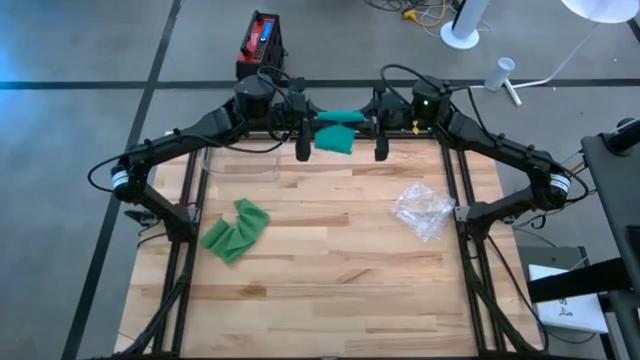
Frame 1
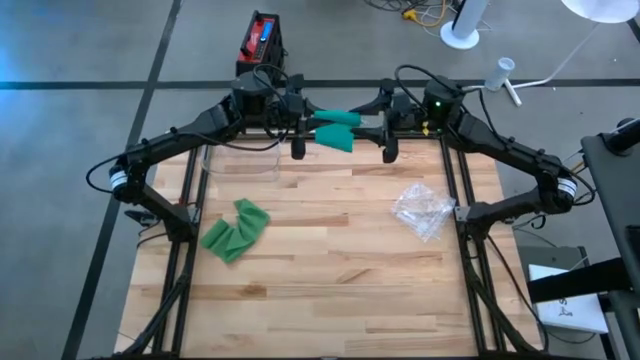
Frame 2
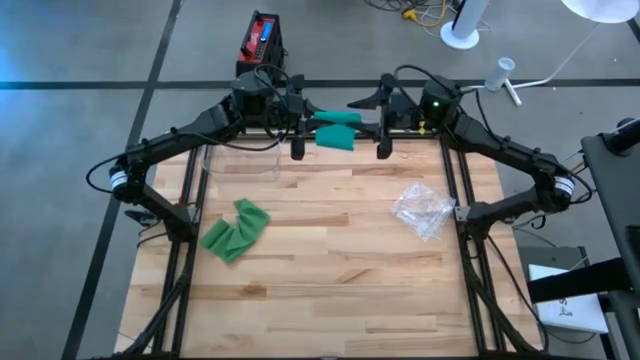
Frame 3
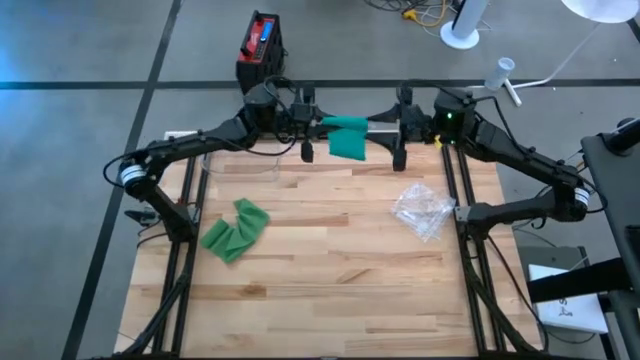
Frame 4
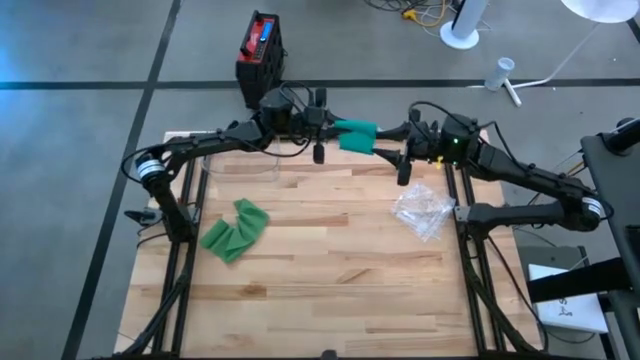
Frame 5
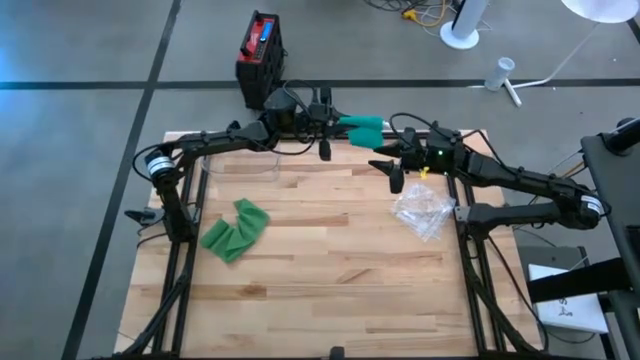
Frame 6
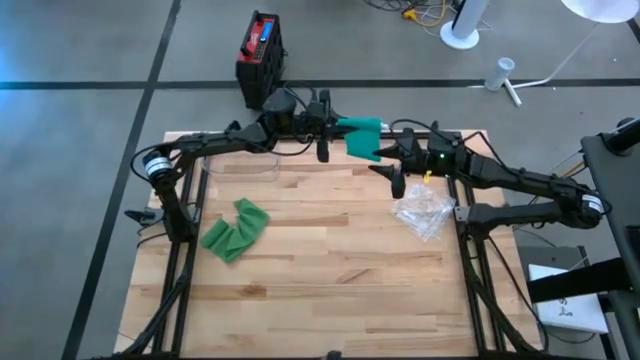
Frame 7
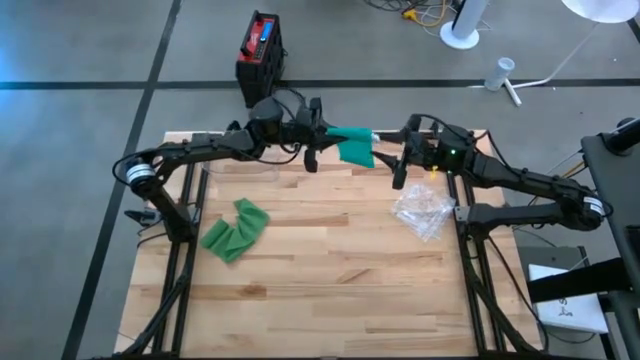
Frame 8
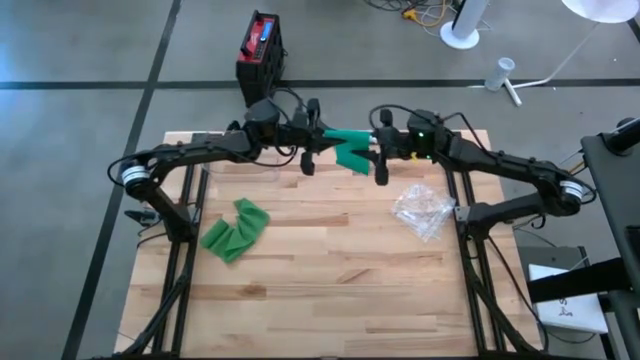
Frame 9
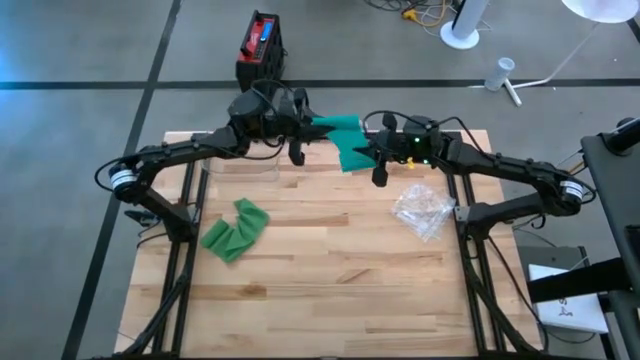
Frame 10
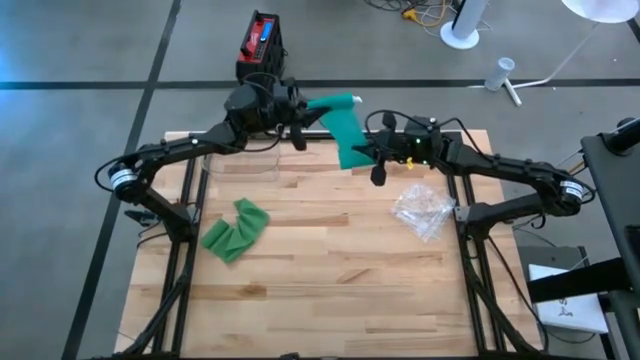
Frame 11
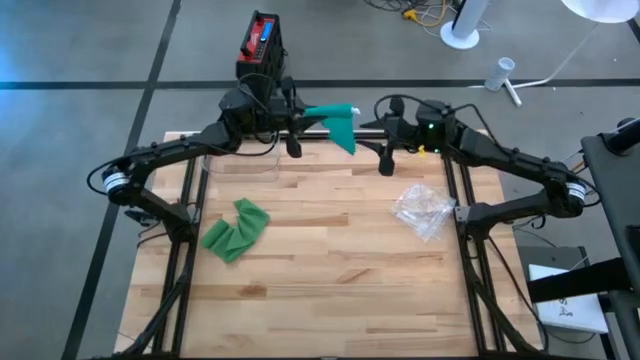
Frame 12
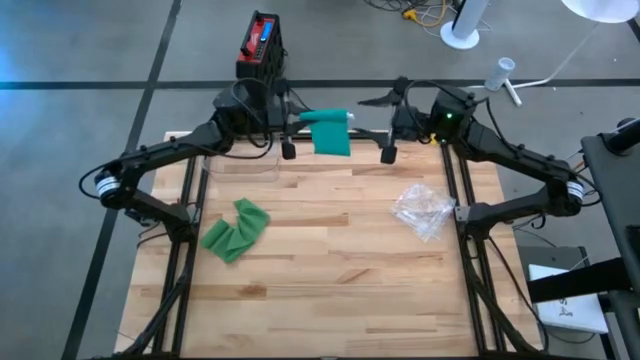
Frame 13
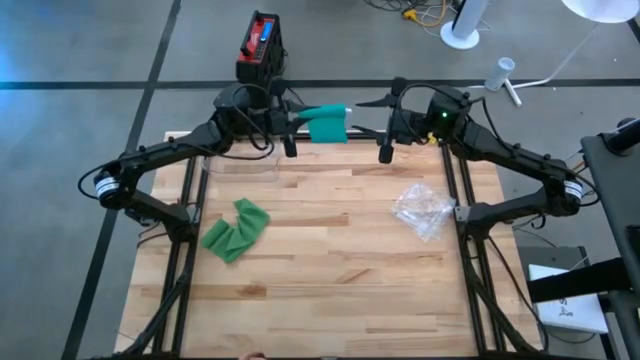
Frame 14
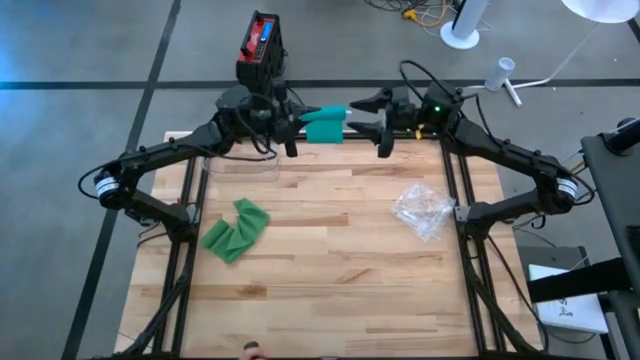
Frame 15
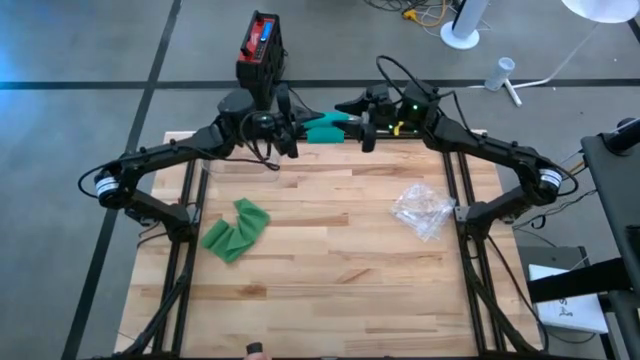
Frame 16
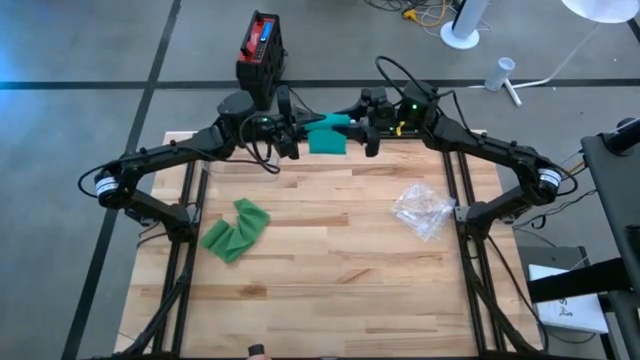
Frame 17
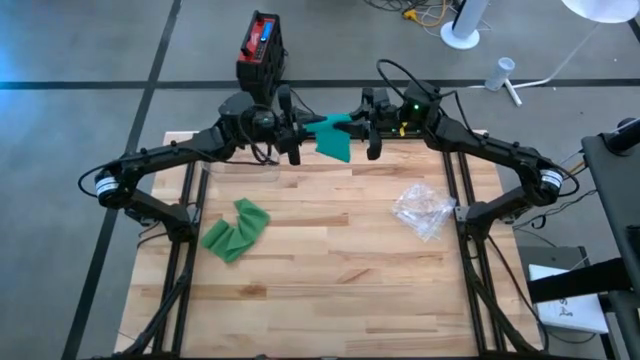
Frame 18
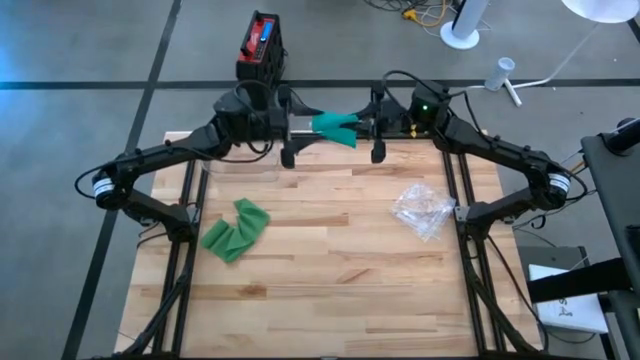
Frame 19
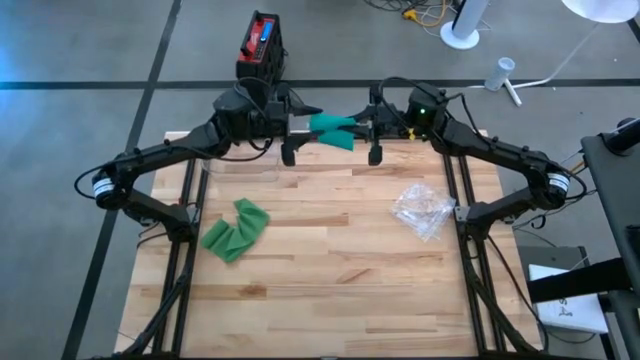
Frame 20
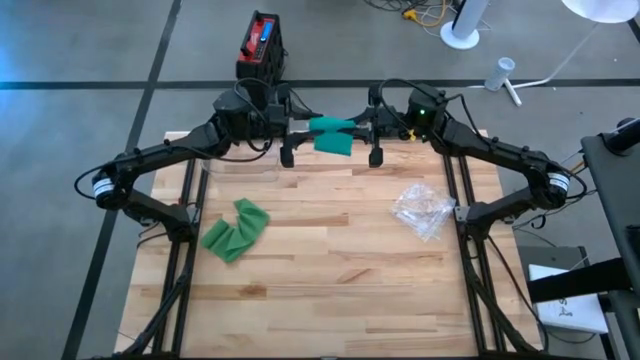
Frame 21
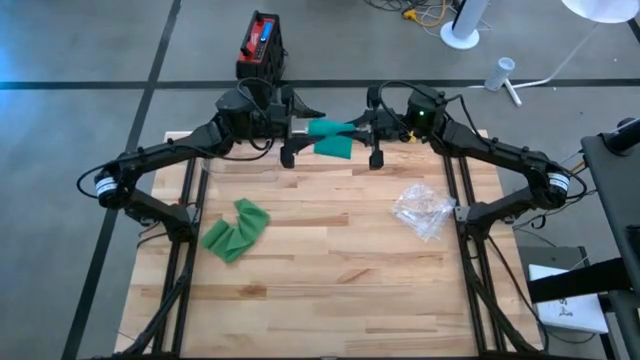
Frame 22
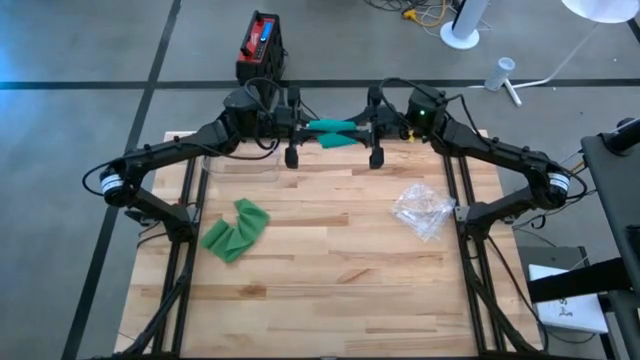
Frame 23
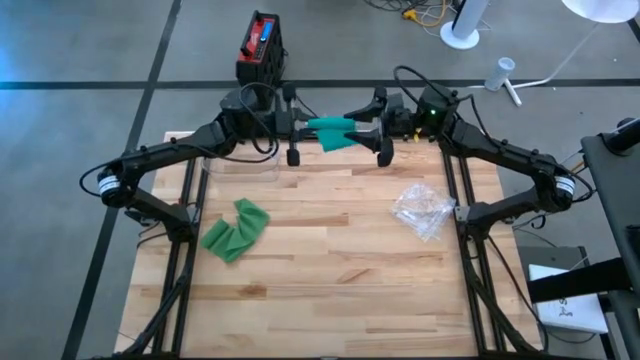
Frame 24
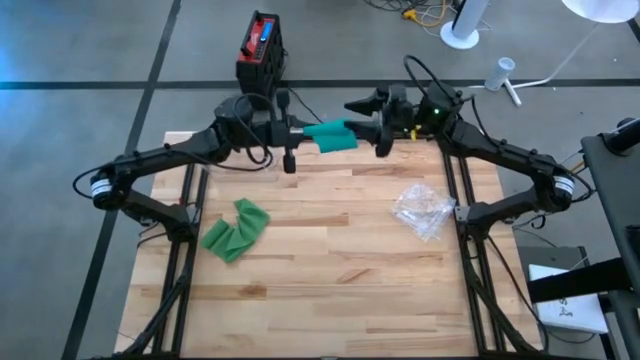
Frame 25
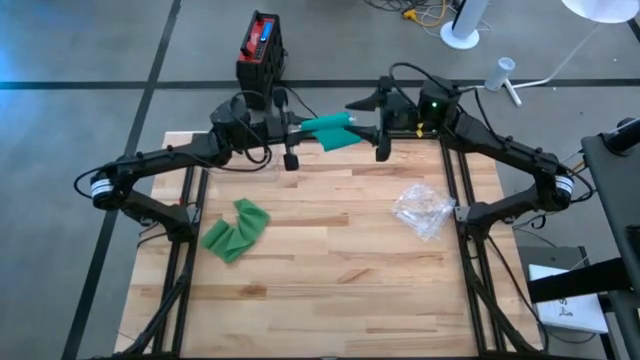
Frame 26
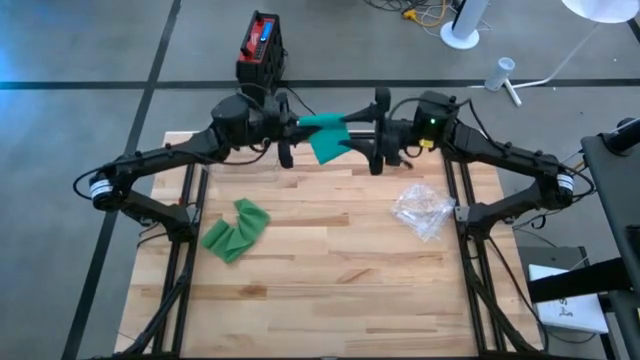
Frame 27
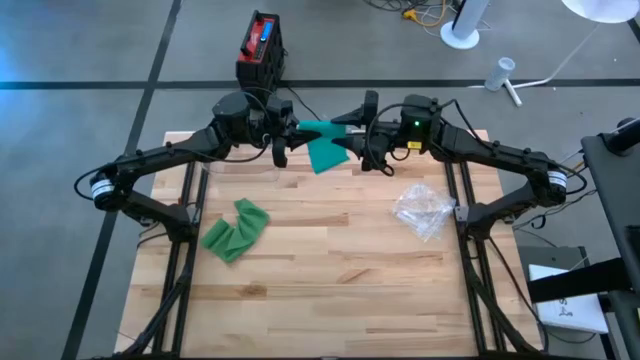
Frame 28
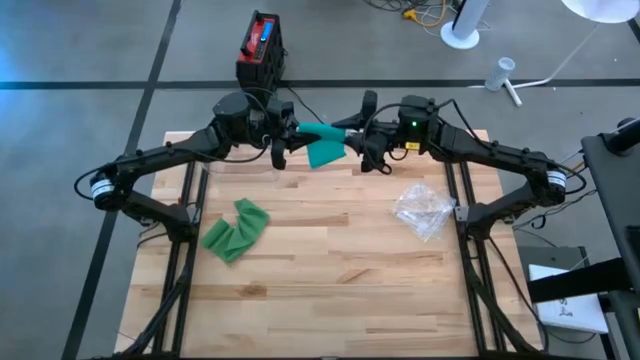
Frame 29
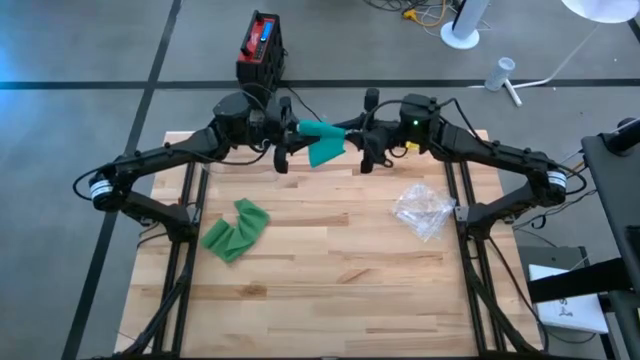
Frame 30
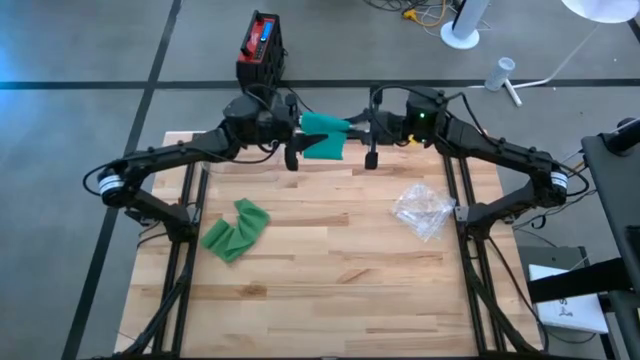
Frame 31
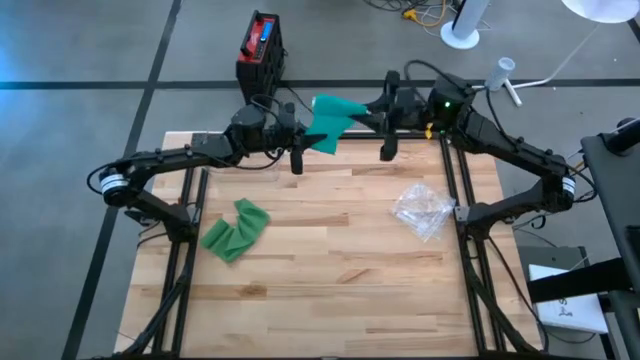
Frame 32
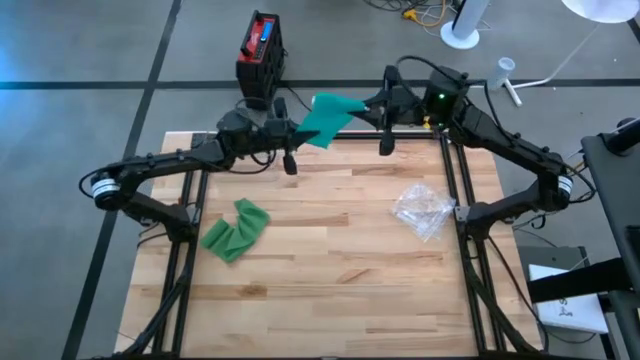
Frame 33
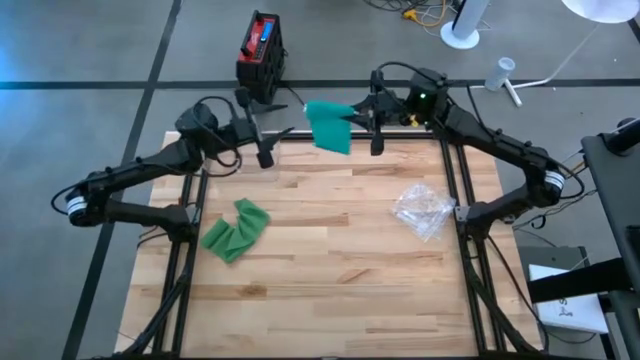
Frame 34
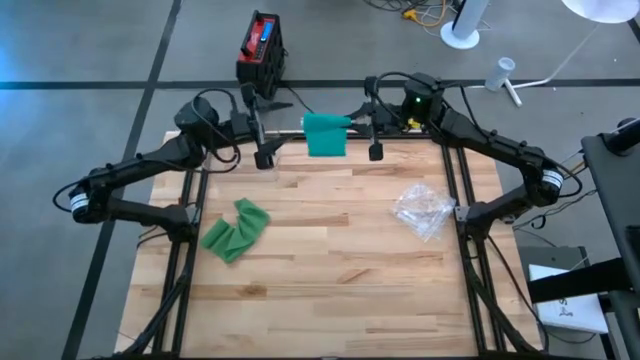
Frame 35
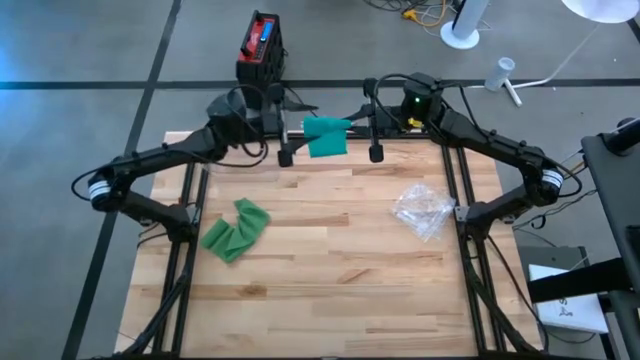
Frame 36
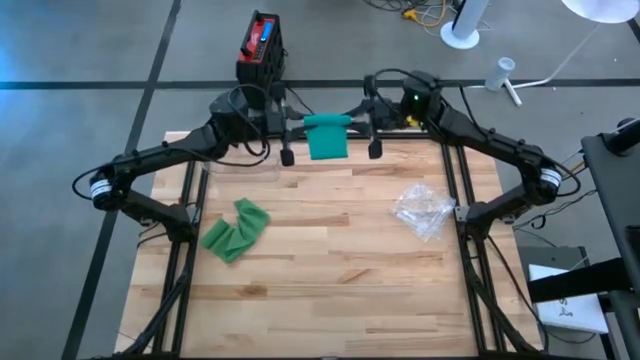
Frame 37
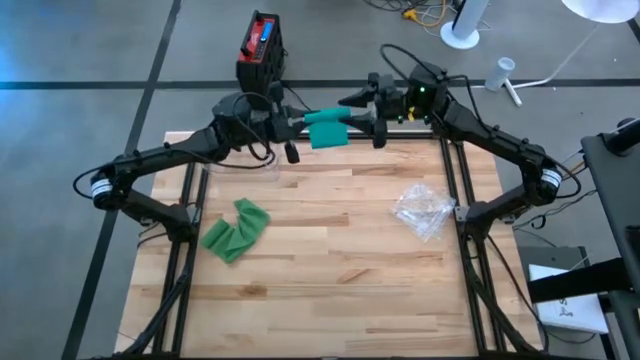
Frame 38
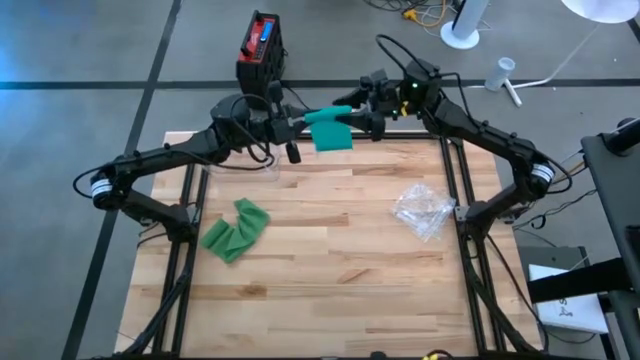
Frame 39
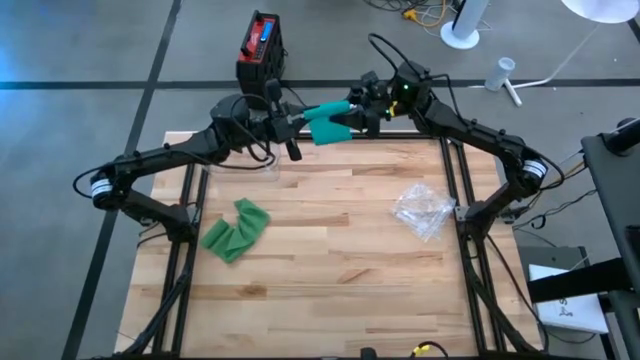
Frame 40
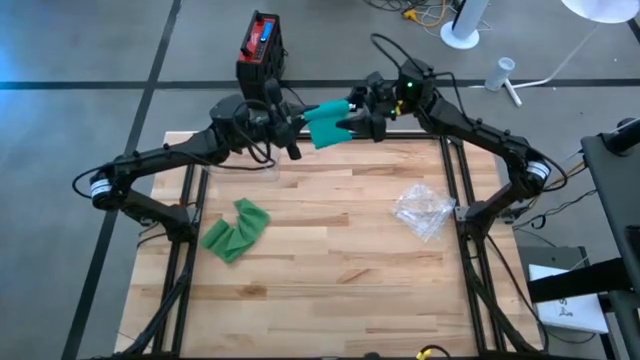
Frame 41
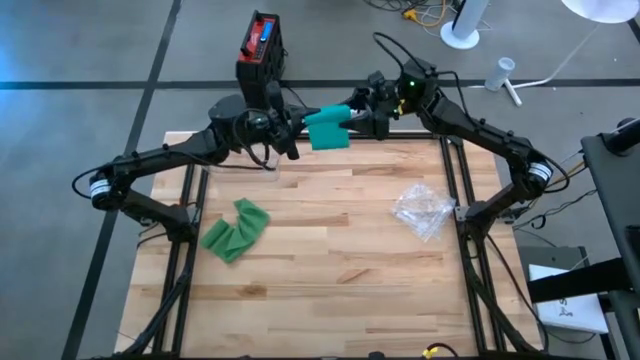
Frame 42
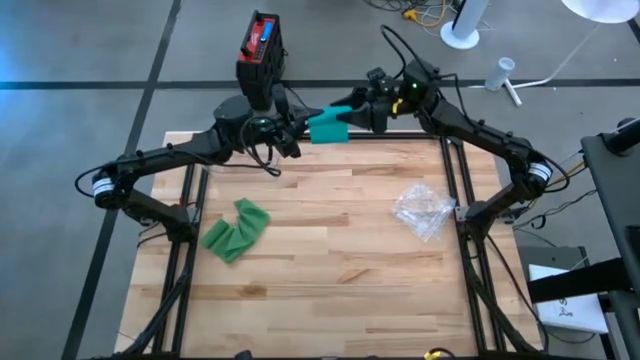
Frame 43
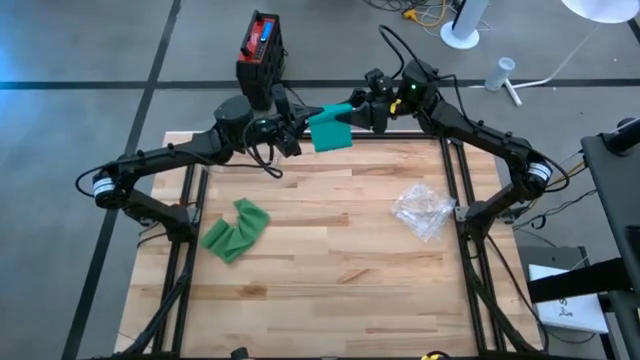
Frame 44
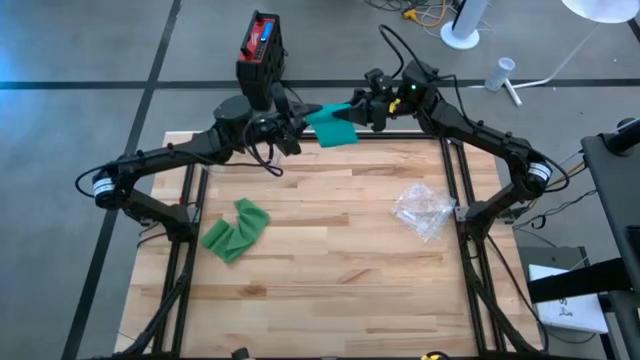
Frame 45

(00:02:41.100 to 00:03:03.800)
Task: Roll bandage
Roll the blue bandage
